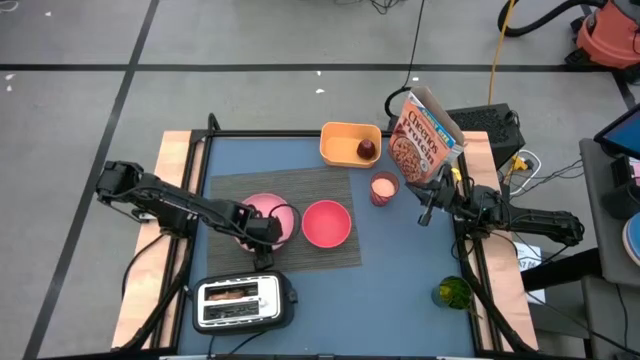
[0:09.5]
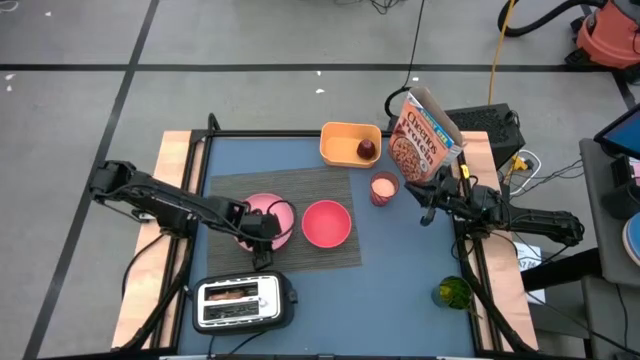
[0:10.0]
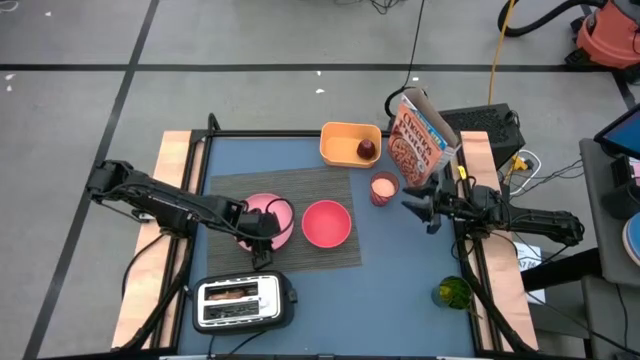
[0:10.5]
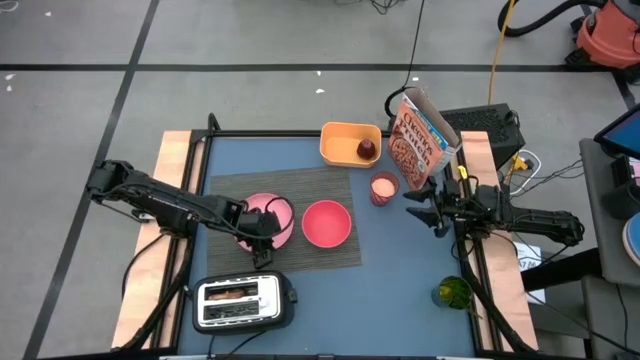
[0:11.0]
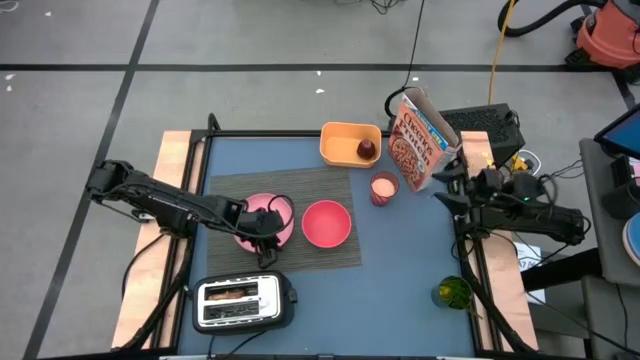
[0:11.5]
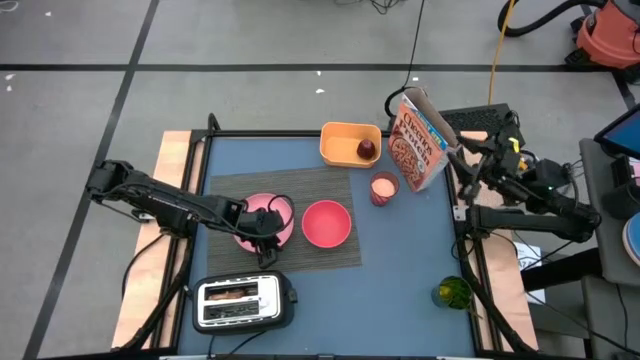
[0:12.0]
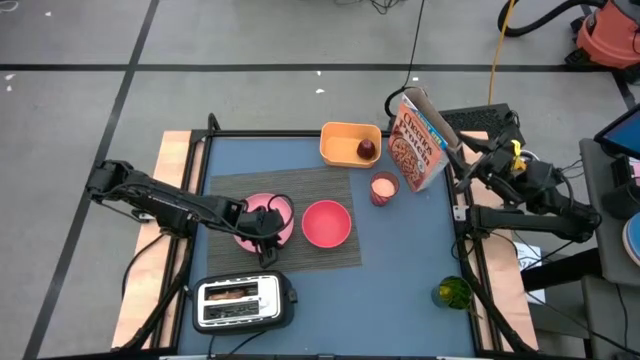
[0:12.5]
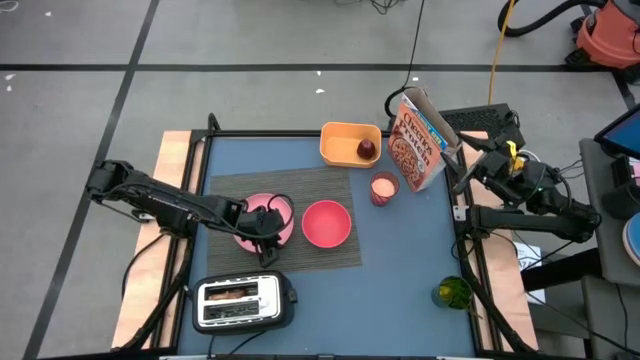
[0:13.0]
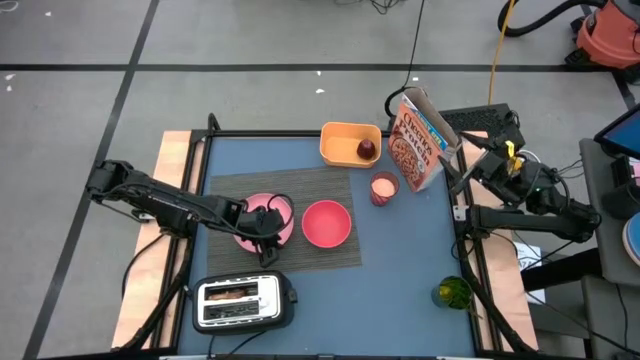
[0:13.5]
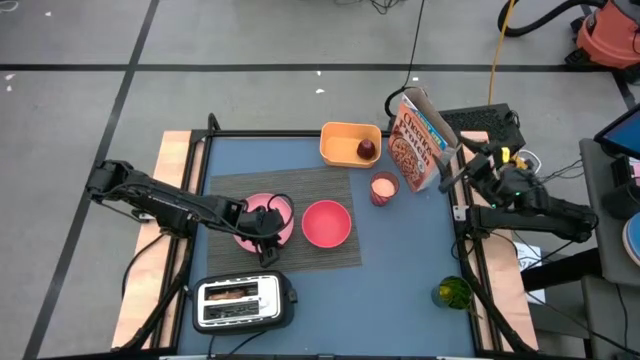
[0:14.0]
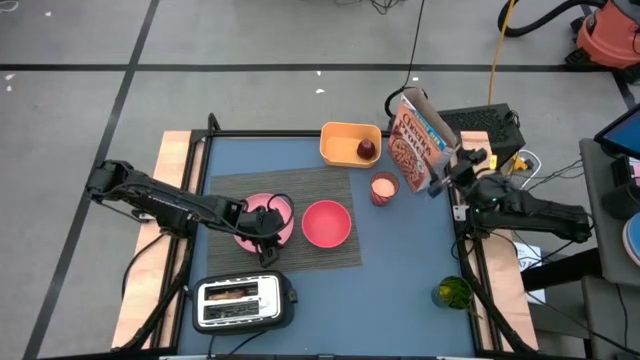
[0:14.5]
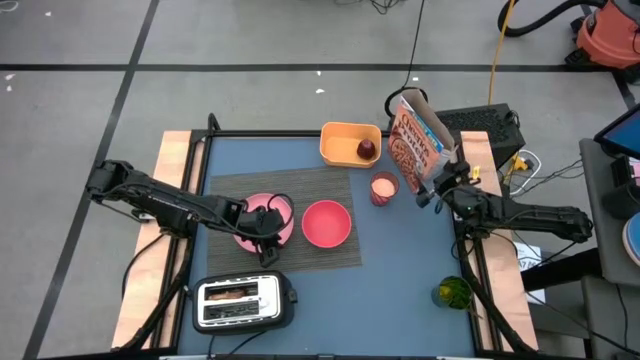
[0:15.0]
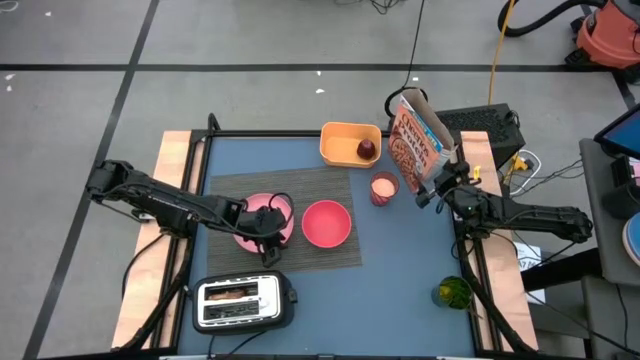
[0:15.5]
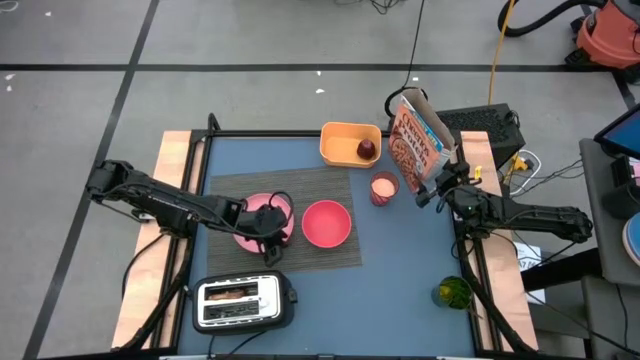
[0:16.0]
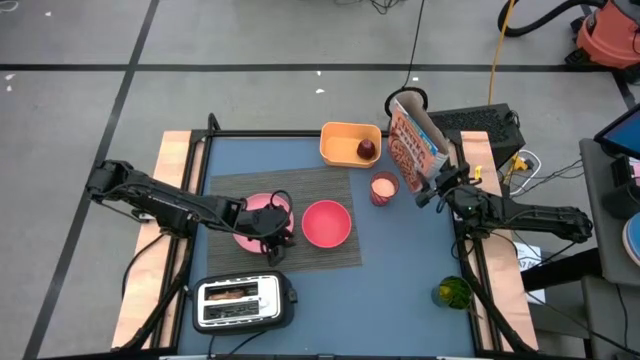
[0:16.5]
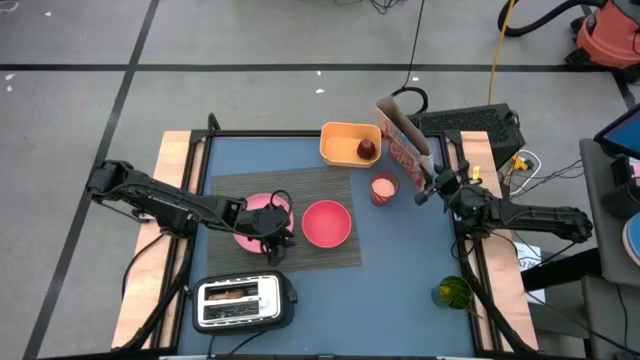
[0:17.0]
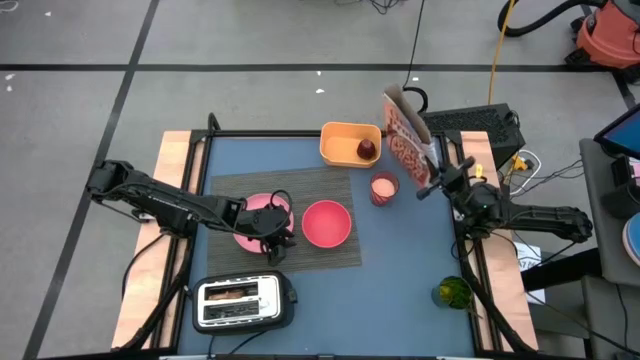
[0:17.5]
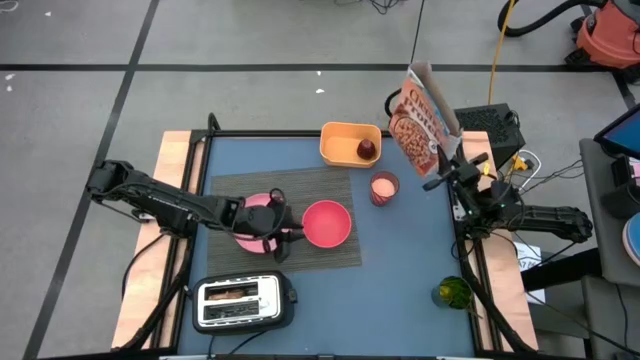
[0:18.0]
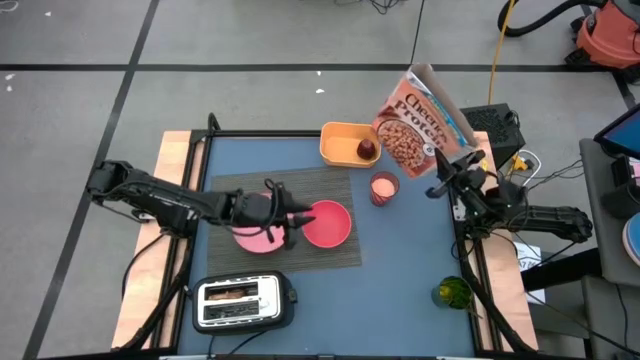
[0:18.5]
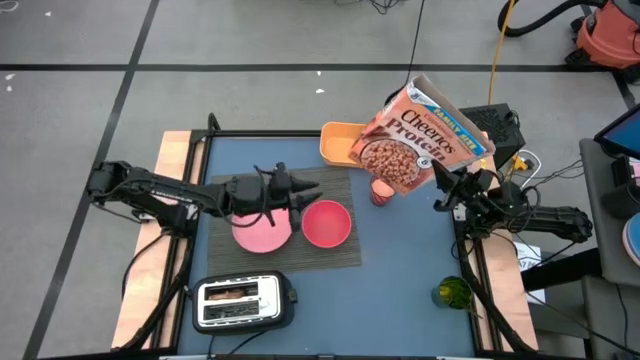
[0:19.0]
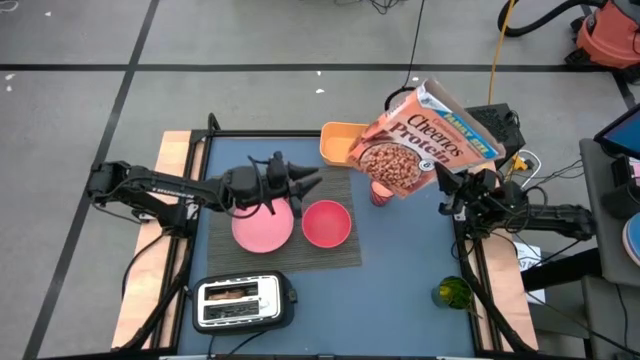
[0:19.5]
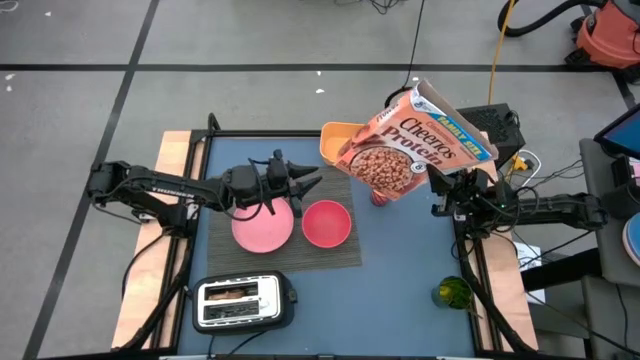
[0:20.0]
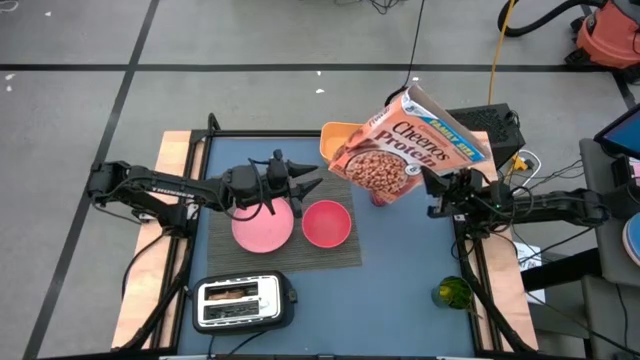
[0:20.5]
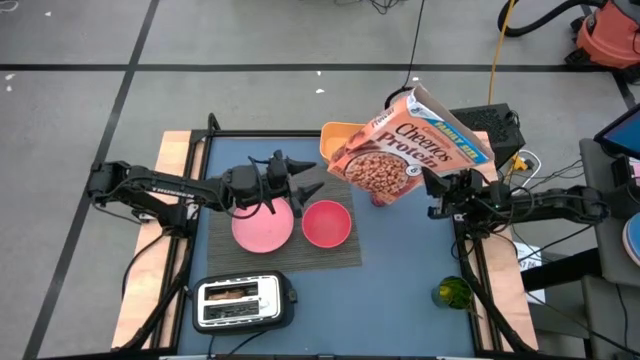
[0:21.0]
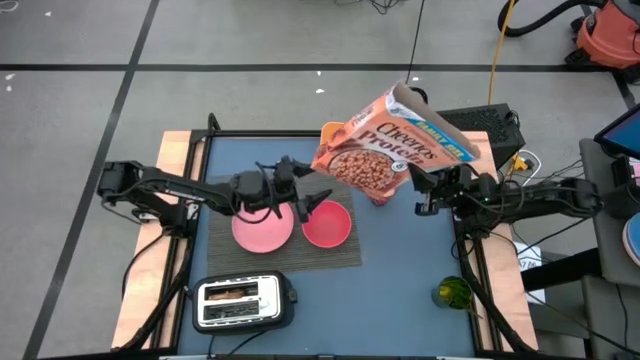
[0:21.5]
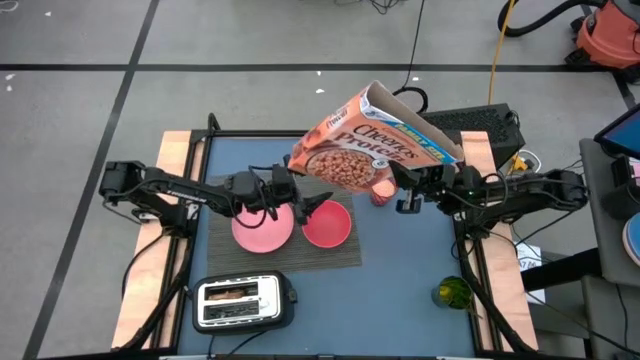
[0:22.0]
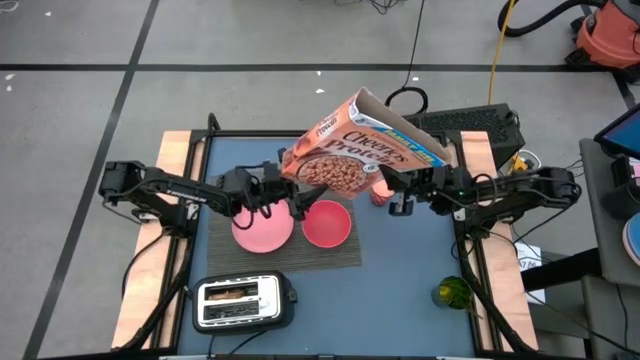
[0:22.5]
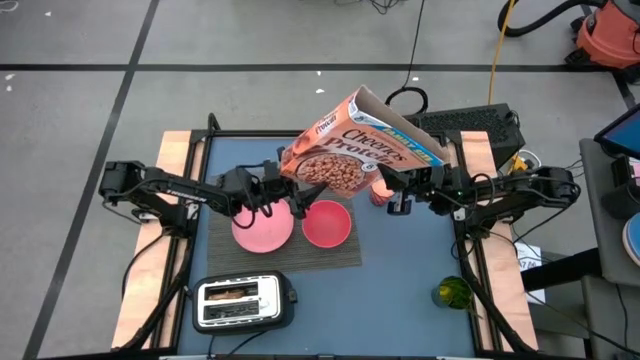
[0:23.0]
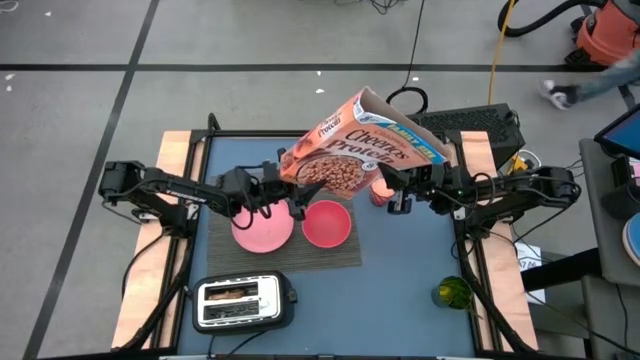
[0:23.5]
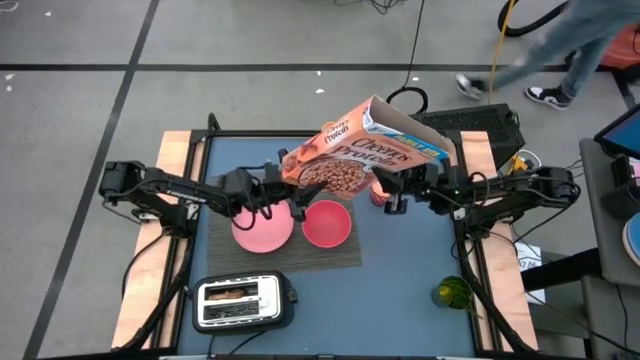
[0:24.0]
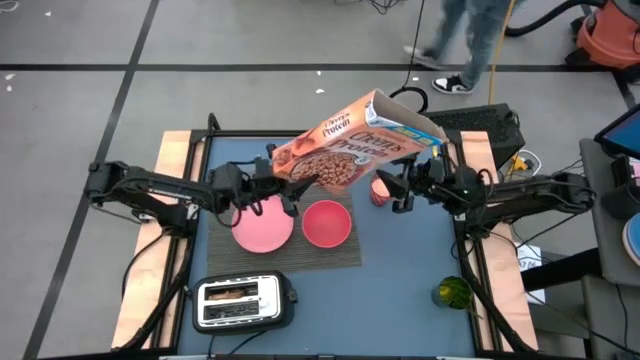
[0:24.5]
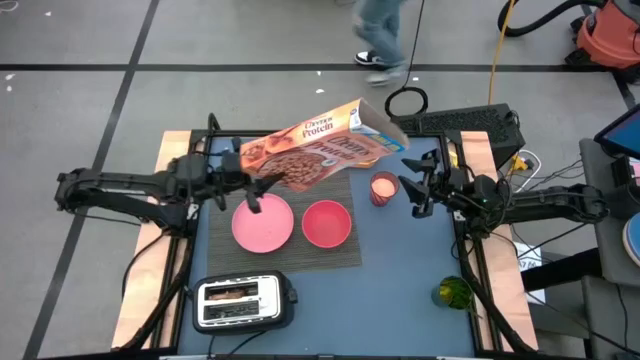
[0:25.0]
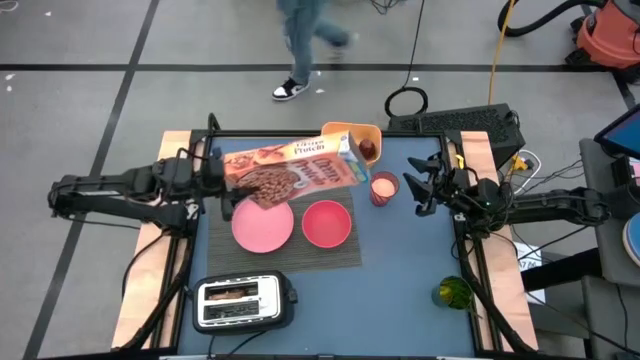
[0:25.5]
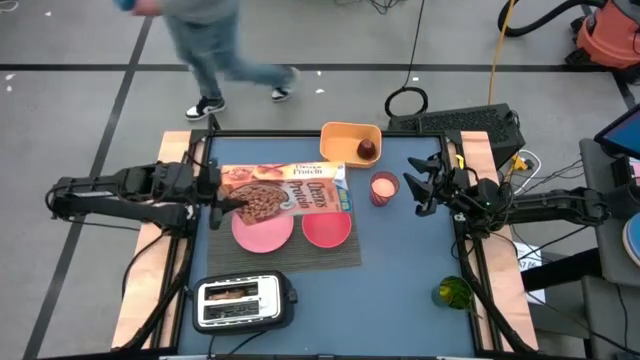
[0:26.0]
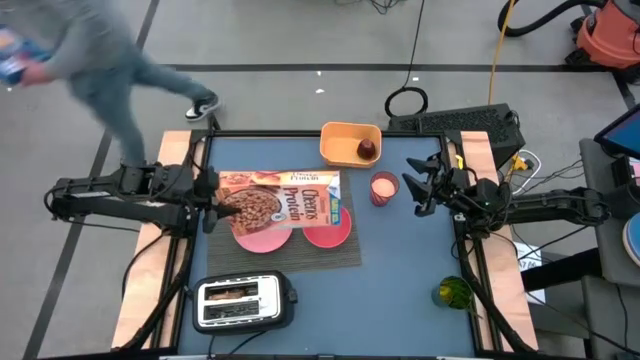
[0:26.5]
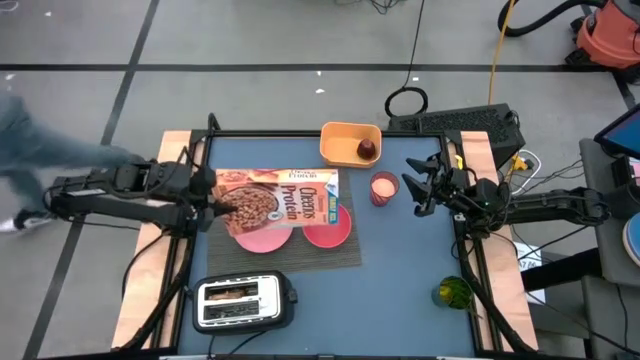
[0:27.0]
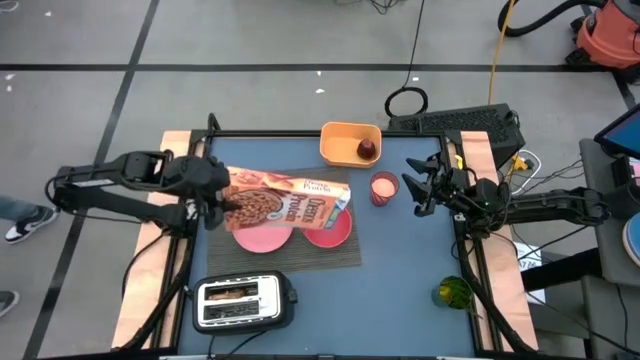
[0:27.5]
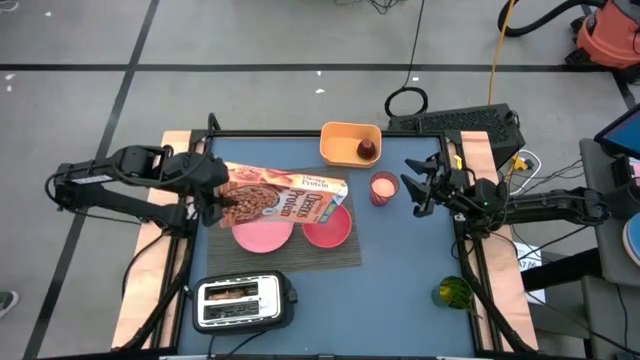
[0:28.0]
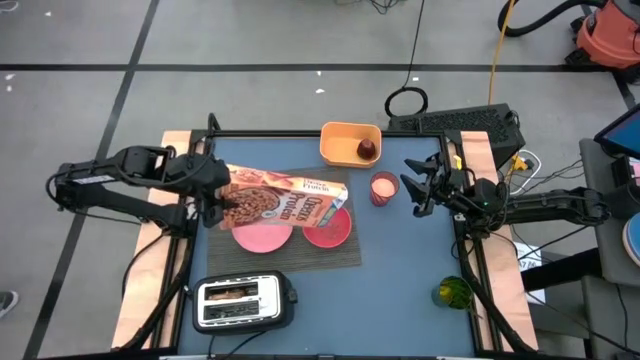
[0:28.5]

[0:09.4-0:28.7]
Task: Arrange a breakfast setting
Pour the cereal into the dark pink bowl
